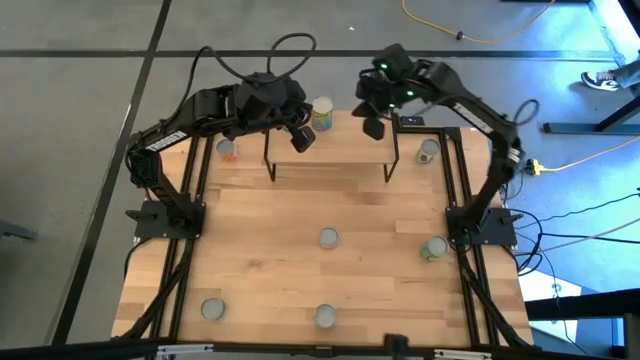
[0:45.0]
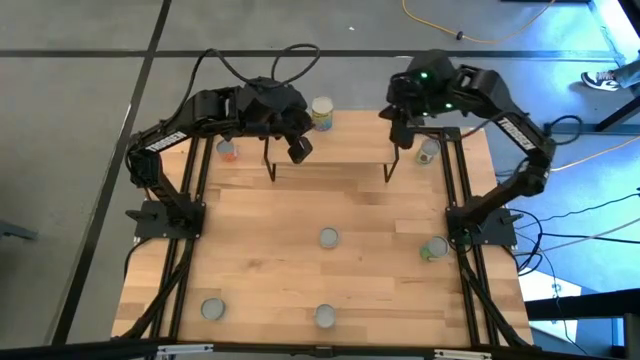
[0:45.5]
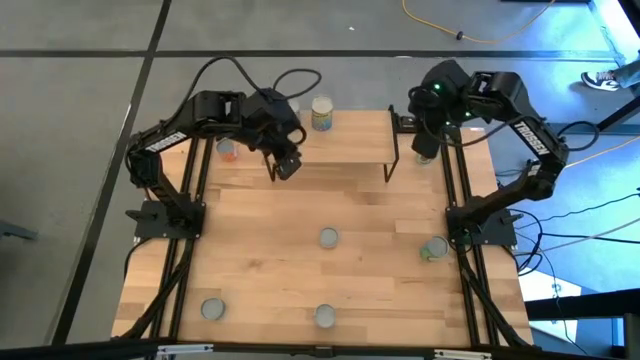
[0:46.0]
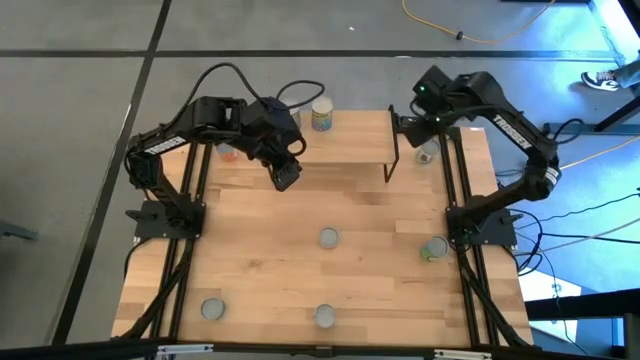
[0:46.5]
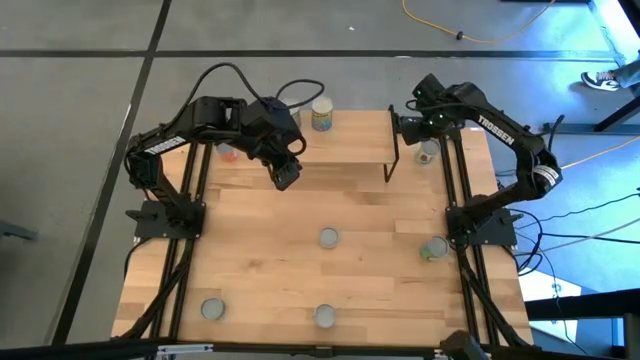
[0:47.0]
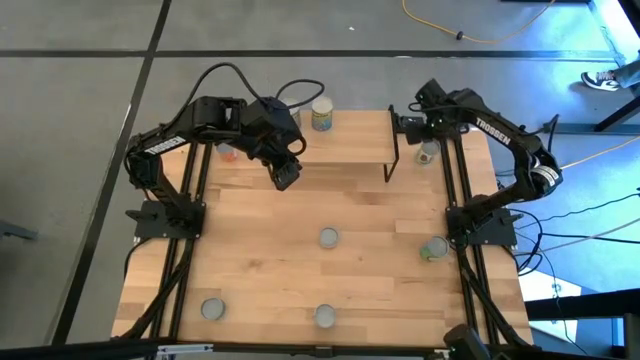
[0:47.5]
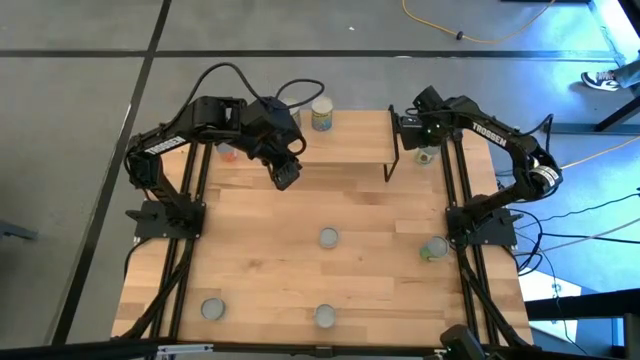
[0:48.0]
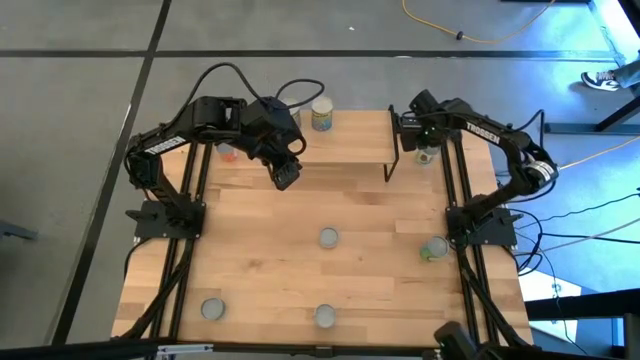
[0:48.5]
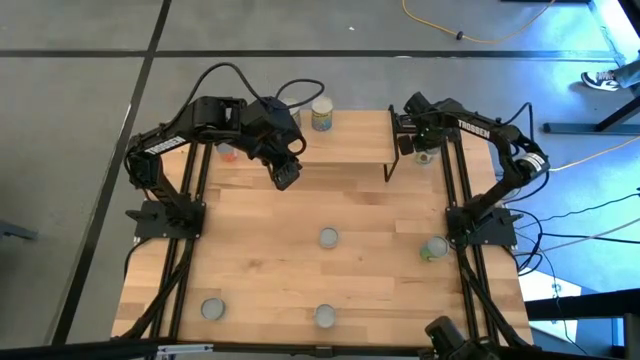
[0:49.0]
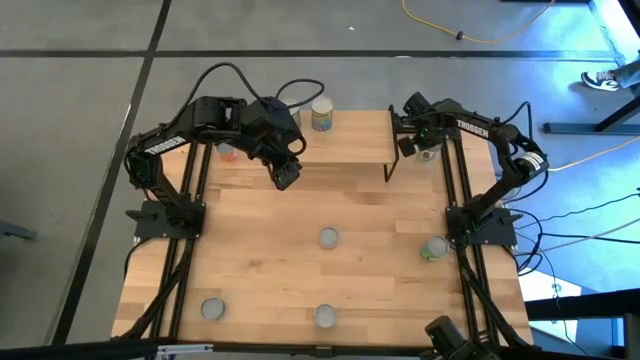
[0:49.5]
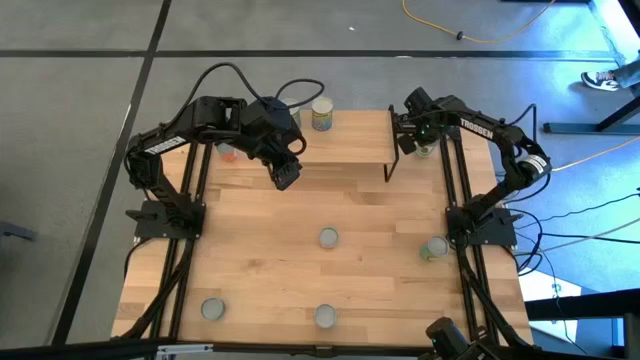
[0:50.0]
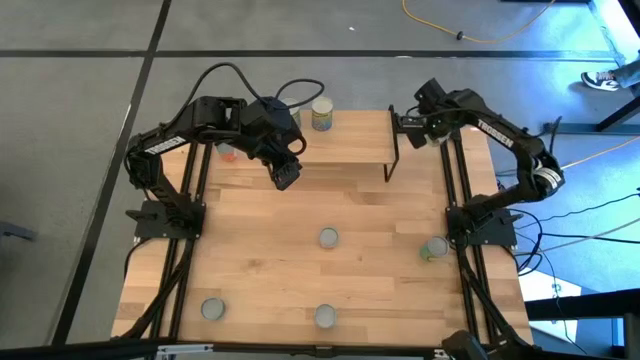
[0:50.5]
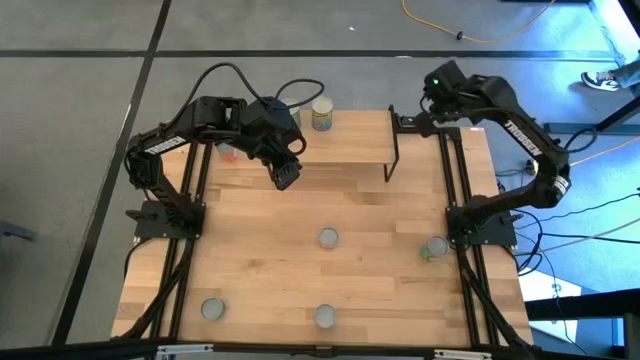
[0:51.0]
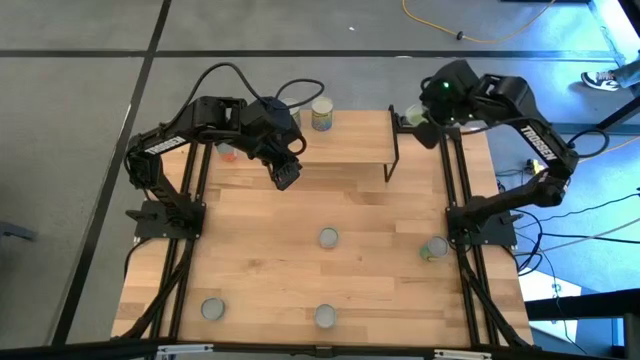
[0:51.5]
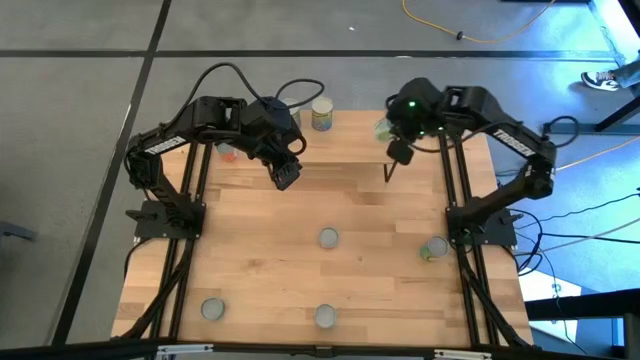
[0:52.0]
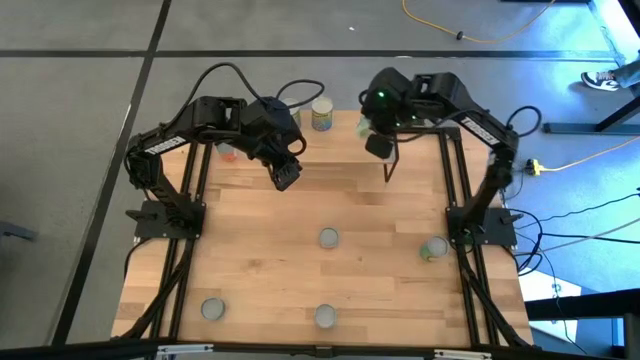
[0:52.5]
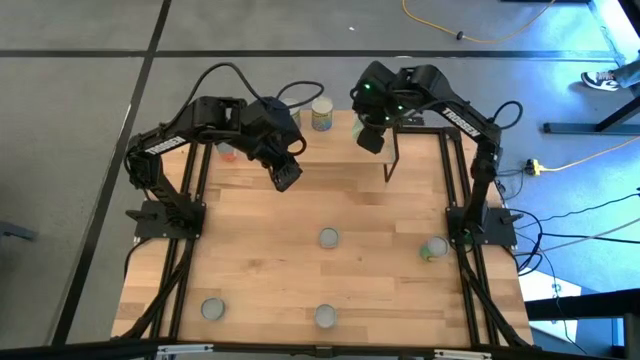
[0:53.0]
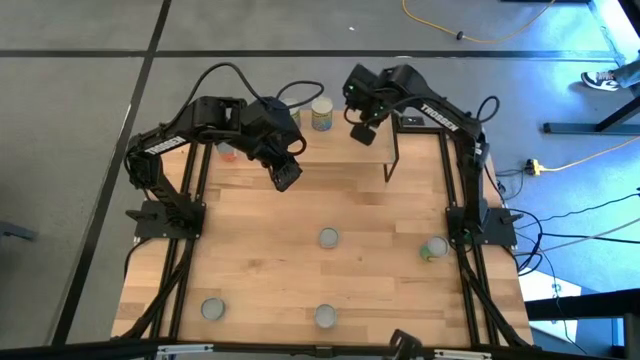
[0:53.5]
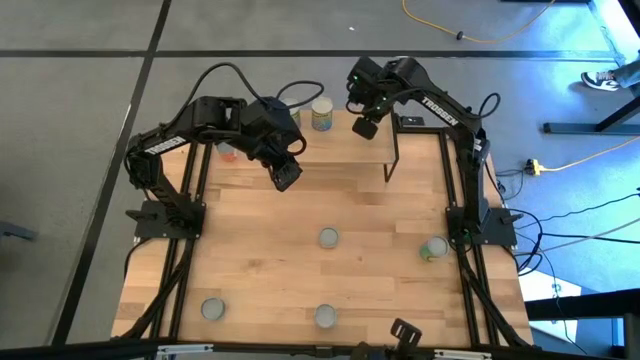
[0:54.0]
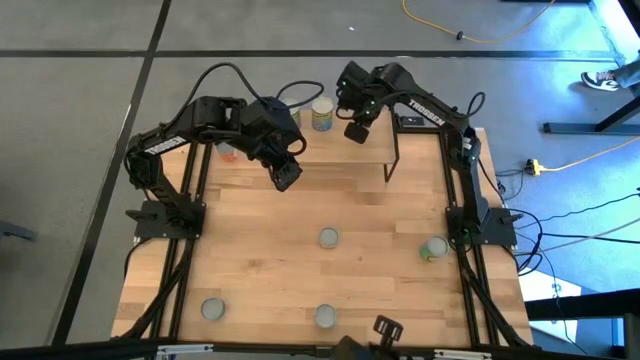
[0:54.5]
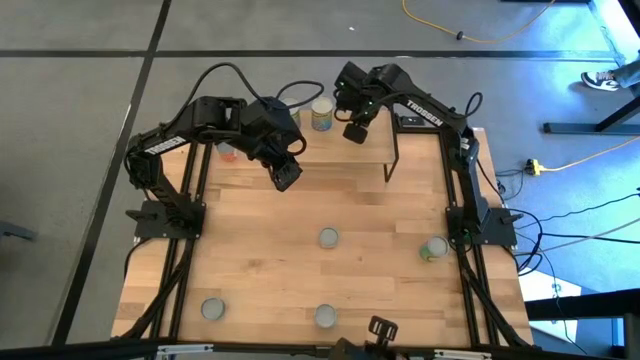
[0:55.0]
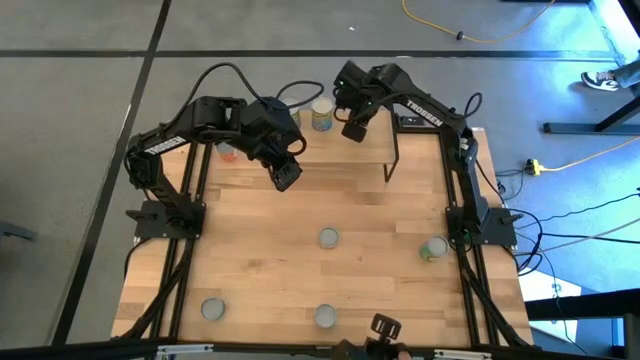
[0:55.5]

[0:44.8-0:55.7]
Task: Pick and place cans onto a shelf
Put the canned mixed veggies on the shelf

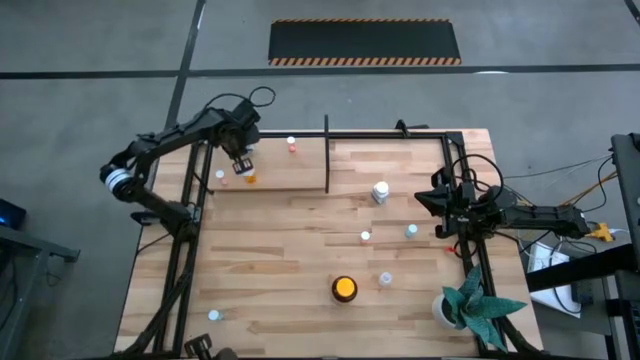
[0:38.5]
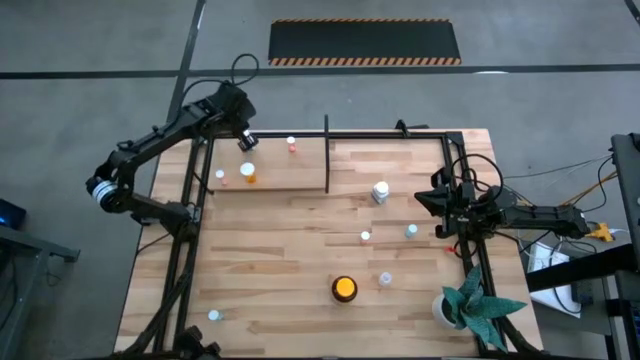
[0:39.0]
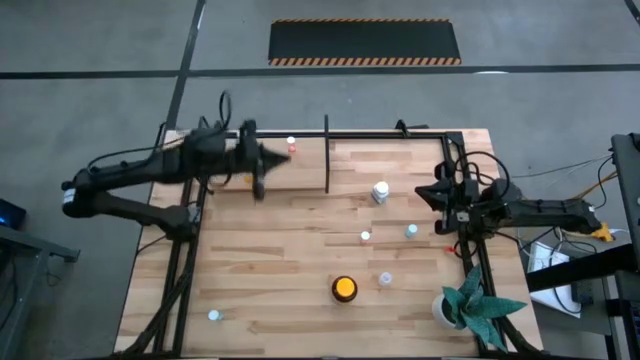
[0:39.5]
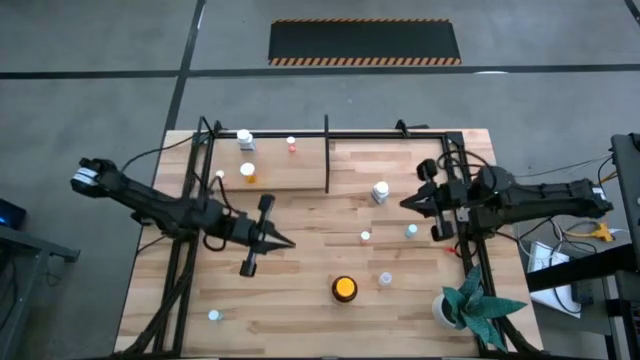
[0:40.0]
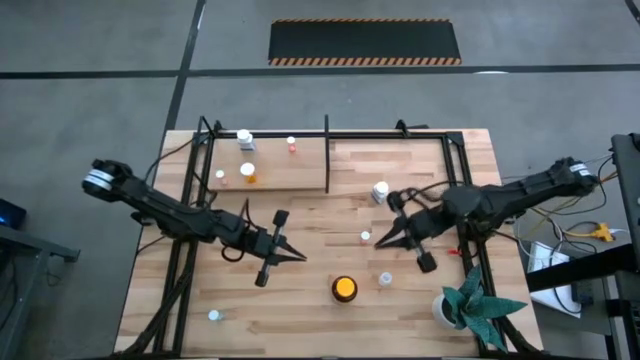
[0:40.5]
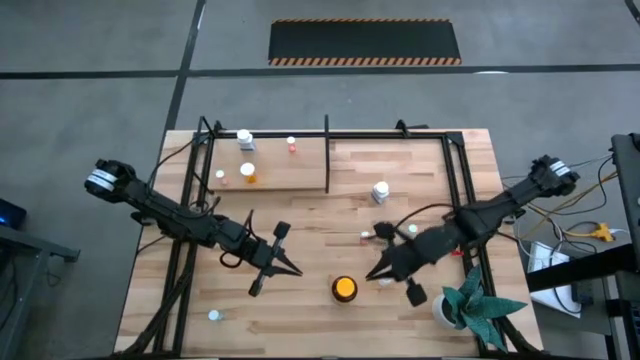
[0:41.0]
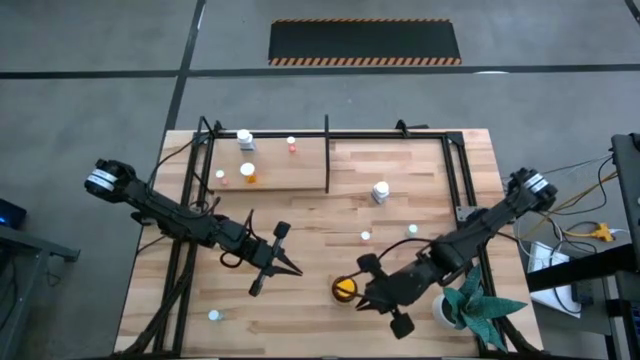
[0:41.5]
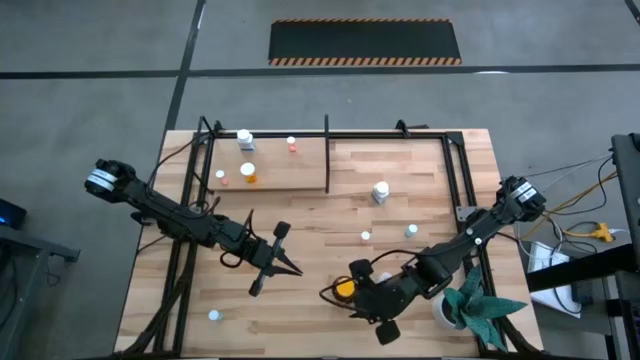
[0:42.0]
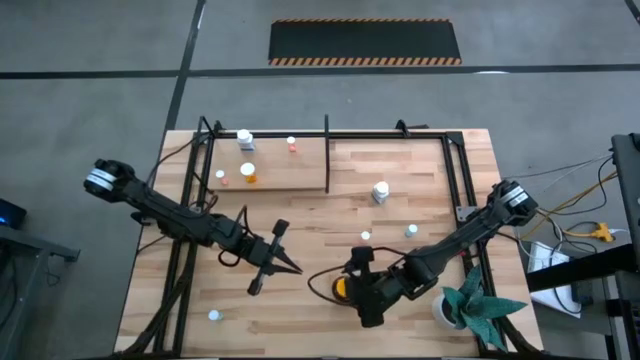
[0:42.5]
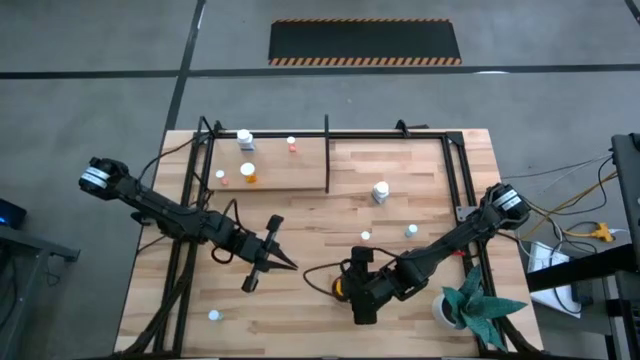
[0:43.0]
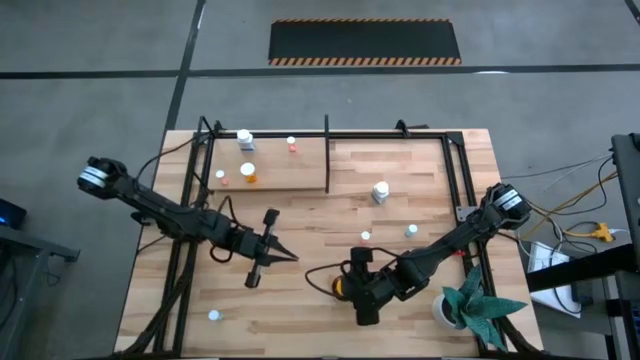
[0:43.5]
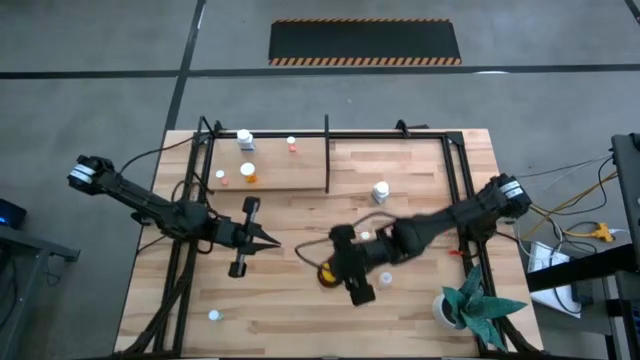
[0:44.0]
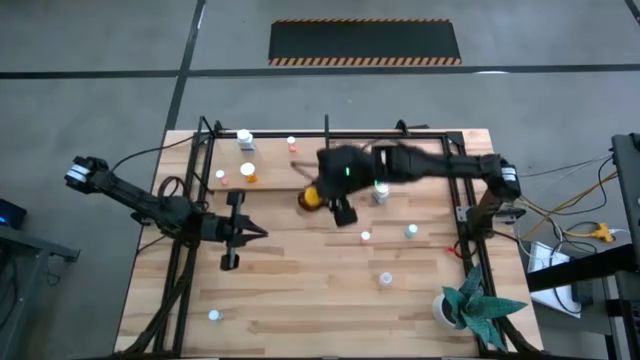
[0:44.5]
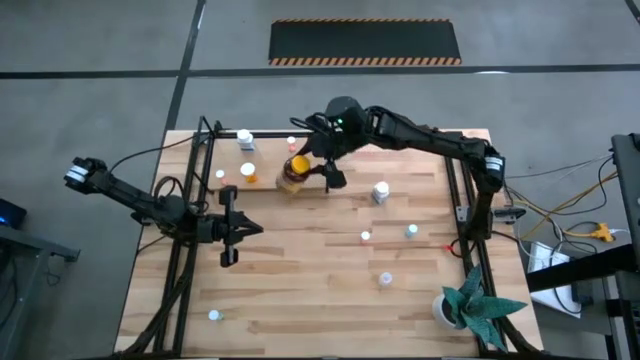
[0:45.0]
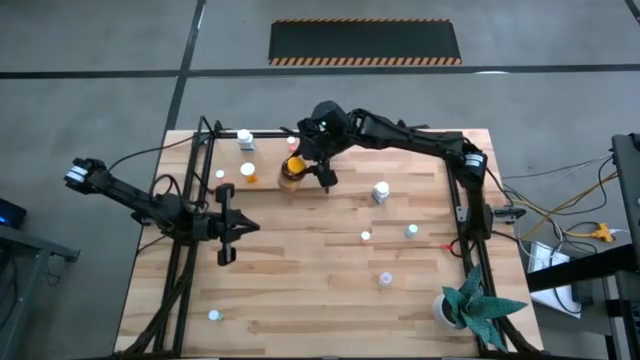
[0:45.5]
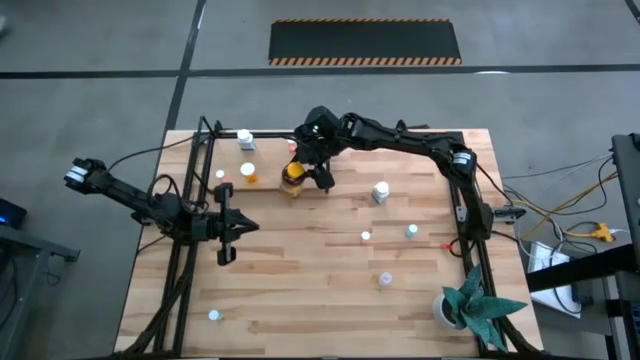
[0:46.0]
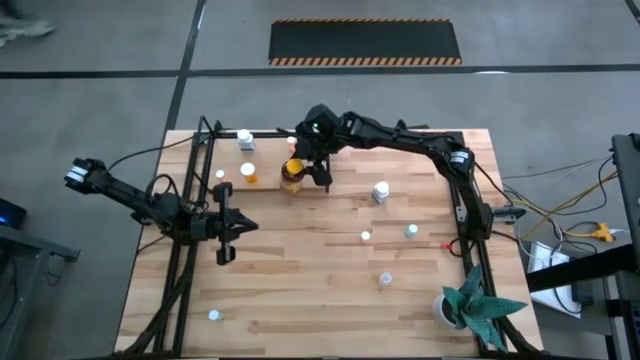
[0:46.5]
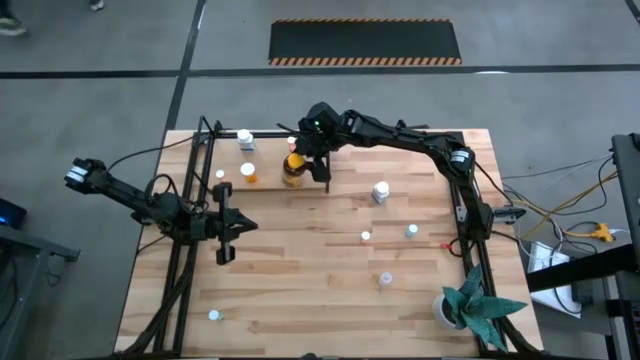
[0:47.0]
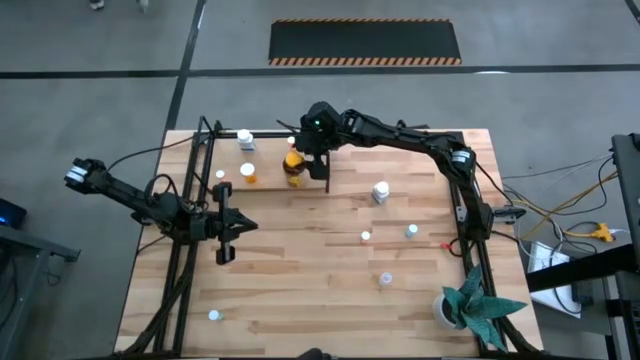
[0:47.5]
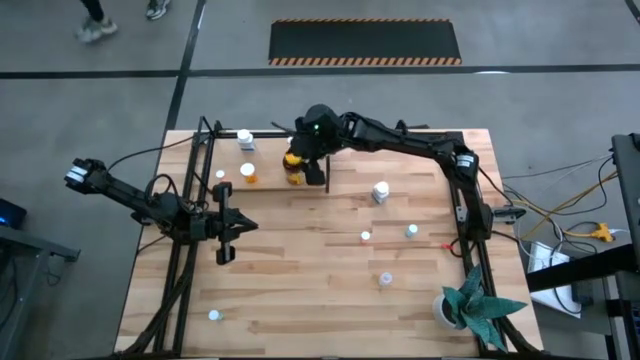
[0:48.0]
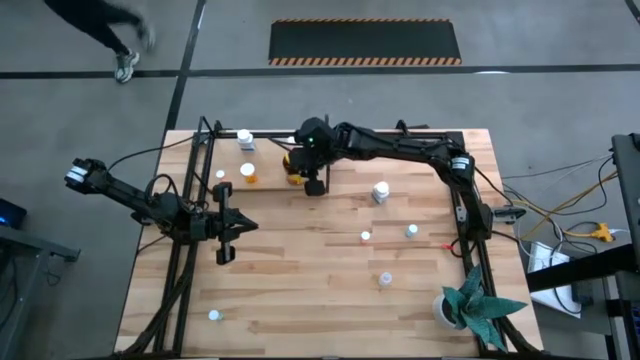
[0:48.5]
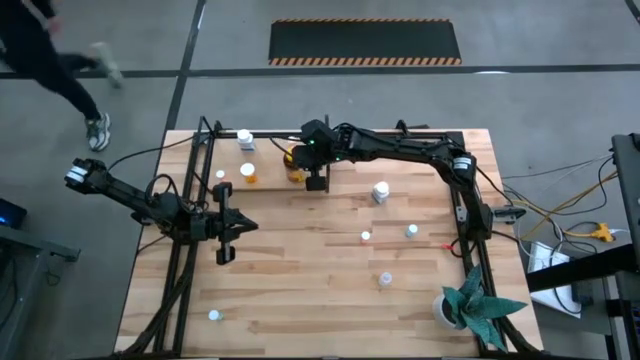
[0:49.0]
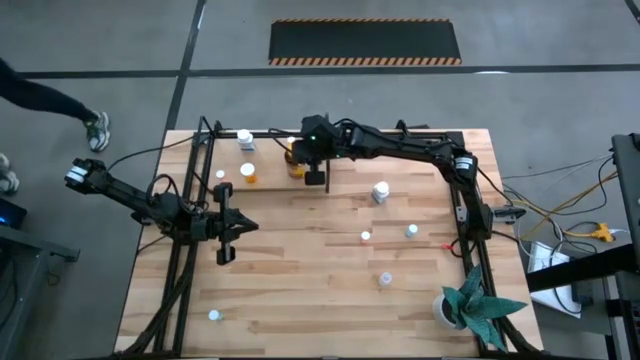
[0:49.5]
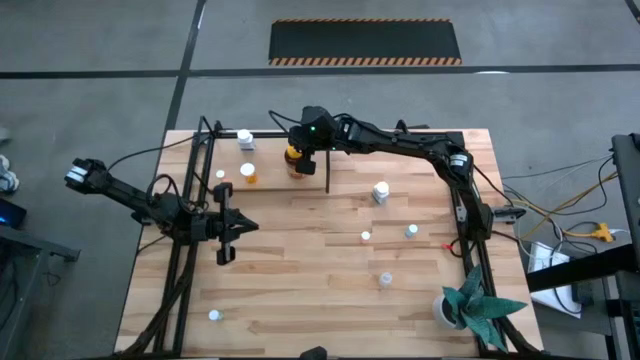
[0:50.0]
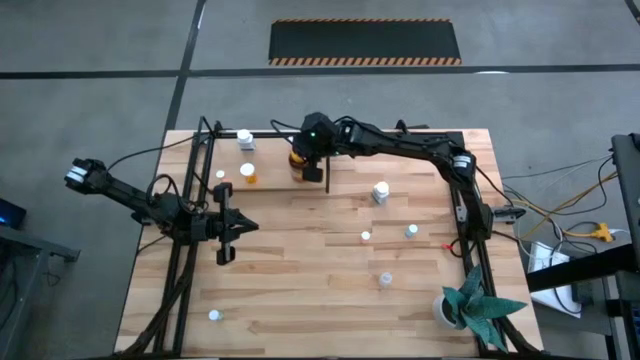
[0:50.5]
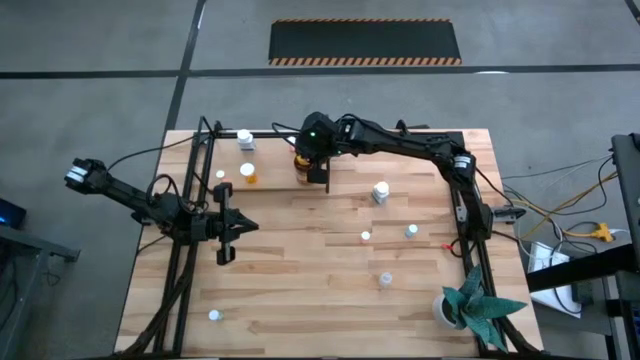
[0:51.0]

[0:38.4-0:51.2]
Task: Pick and place medicine bottles onto shelf by color
Put the yellow pill bottle on the shelf
